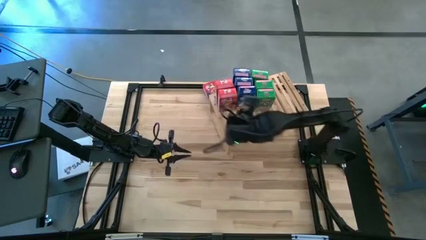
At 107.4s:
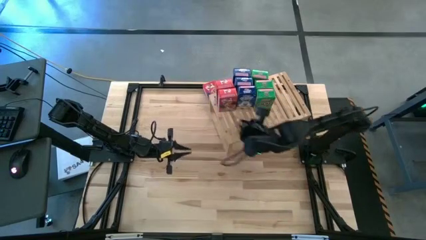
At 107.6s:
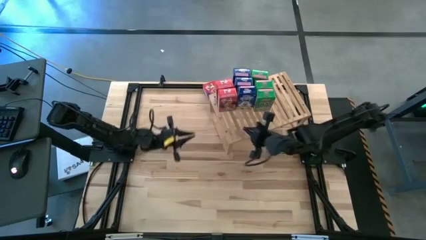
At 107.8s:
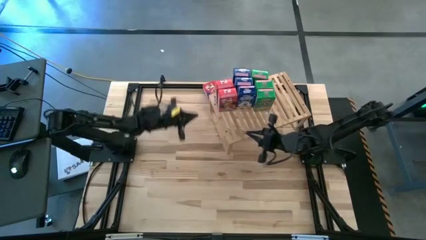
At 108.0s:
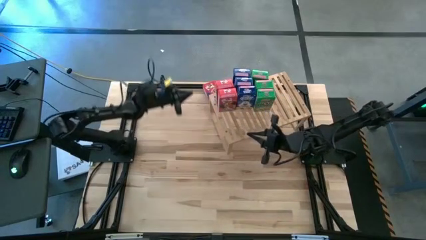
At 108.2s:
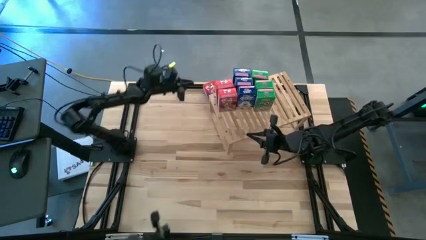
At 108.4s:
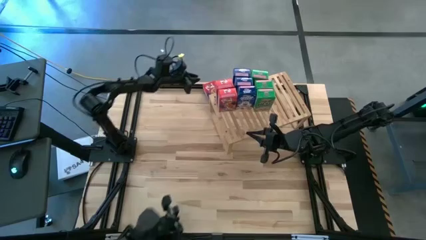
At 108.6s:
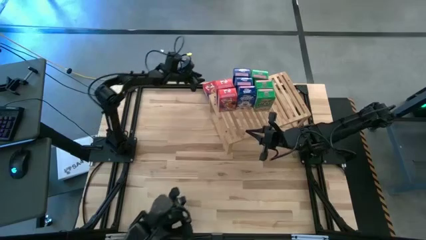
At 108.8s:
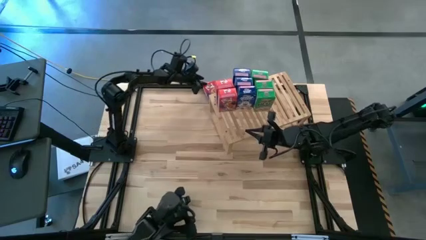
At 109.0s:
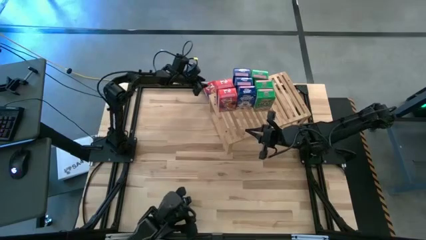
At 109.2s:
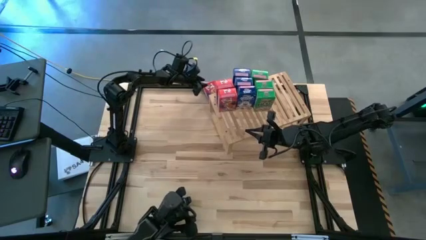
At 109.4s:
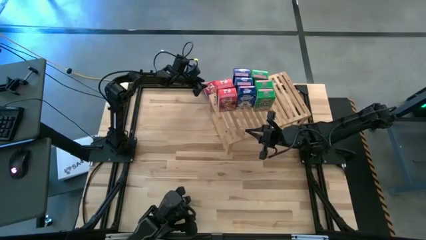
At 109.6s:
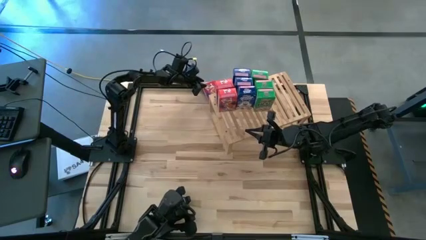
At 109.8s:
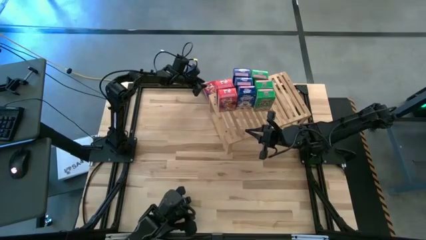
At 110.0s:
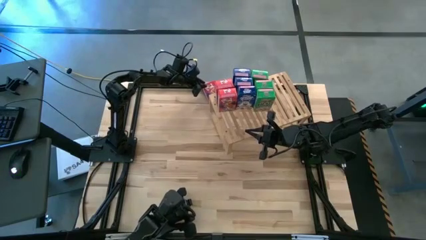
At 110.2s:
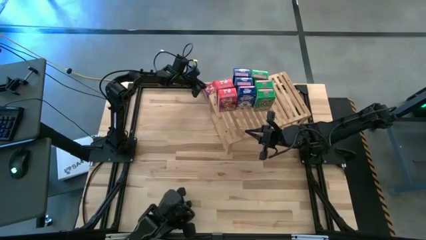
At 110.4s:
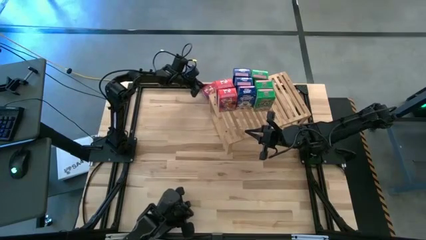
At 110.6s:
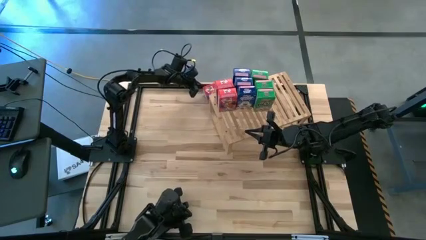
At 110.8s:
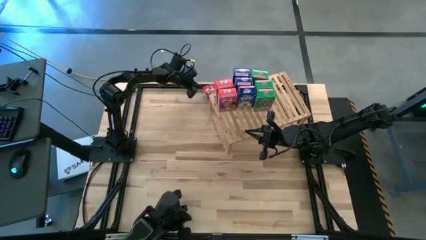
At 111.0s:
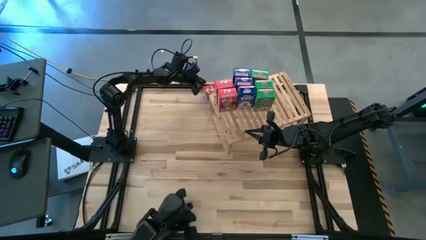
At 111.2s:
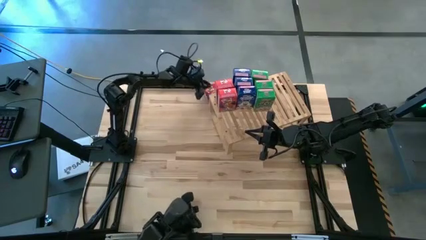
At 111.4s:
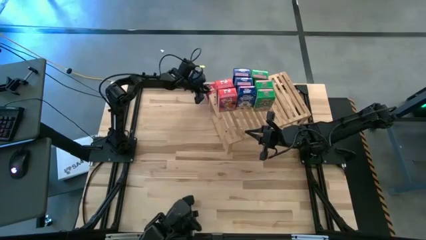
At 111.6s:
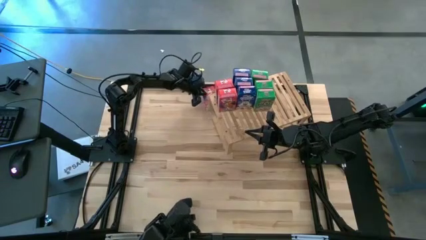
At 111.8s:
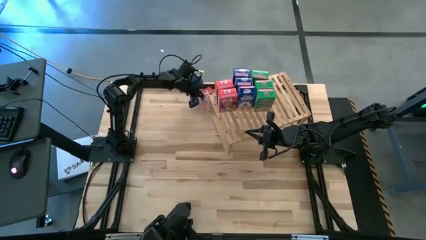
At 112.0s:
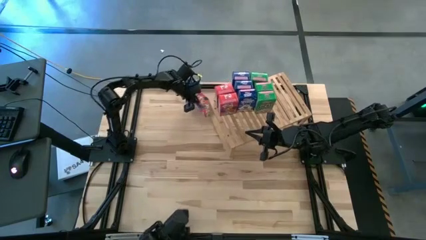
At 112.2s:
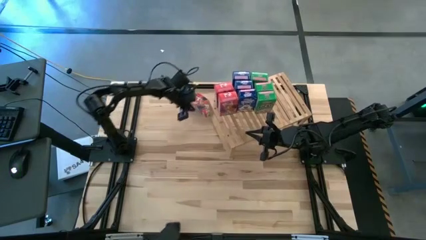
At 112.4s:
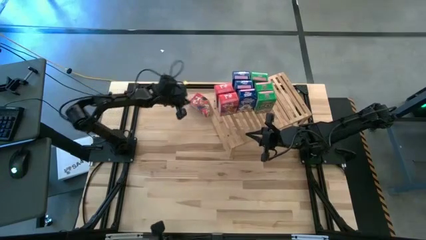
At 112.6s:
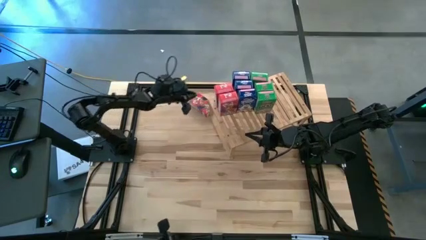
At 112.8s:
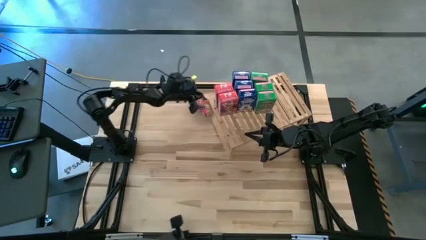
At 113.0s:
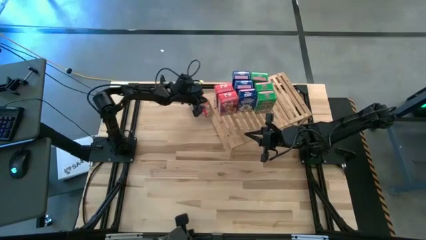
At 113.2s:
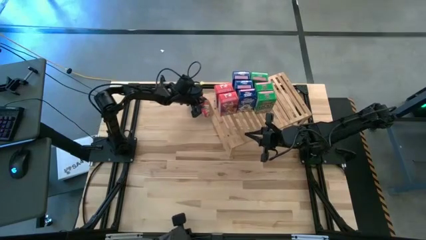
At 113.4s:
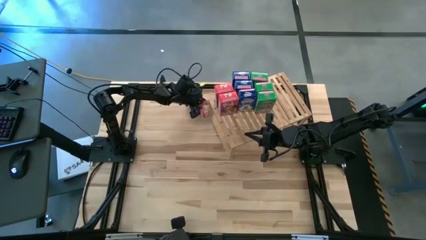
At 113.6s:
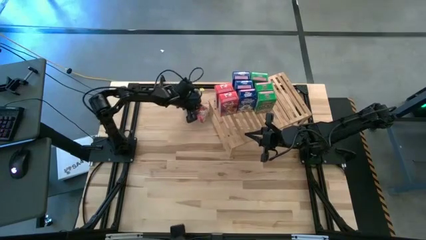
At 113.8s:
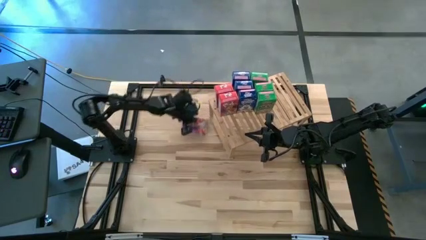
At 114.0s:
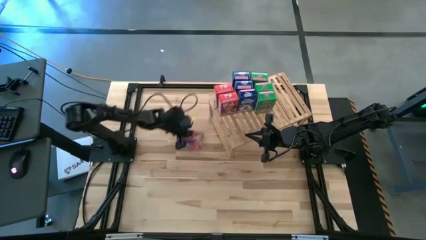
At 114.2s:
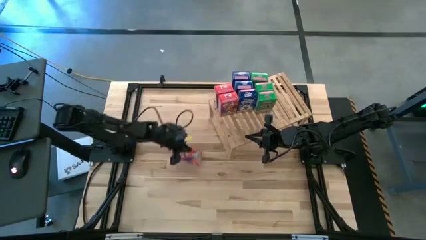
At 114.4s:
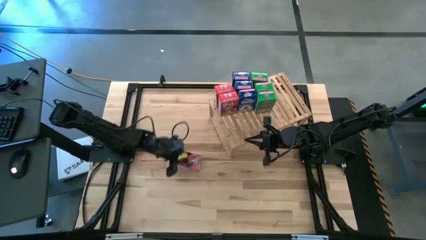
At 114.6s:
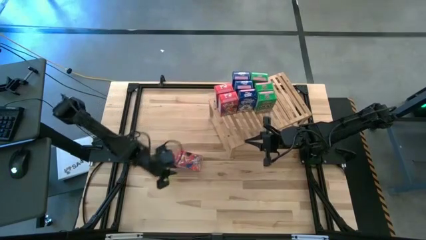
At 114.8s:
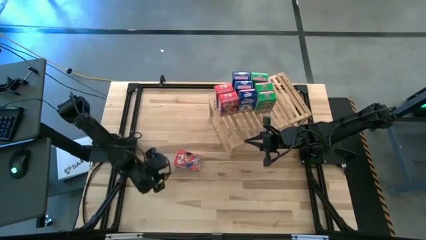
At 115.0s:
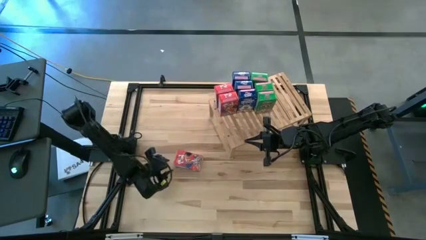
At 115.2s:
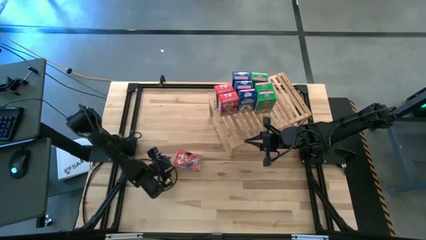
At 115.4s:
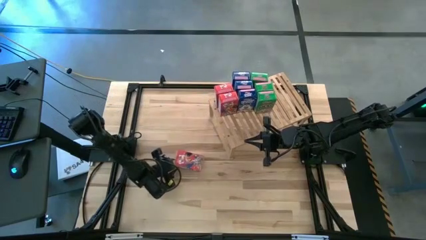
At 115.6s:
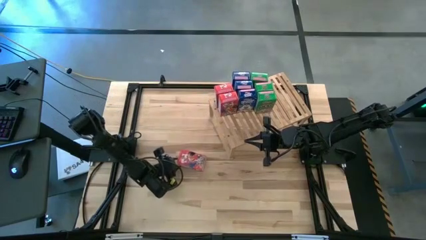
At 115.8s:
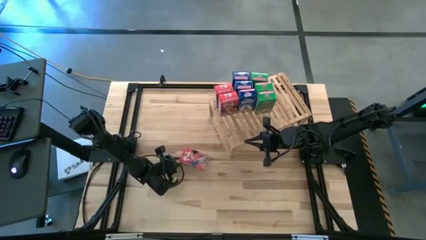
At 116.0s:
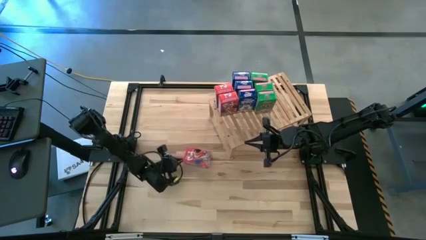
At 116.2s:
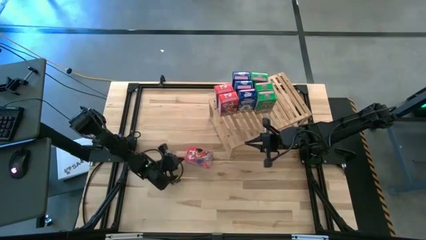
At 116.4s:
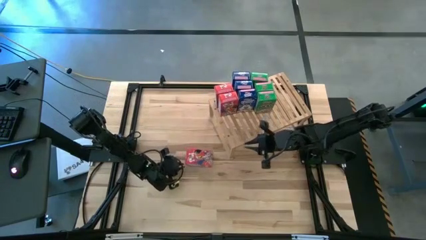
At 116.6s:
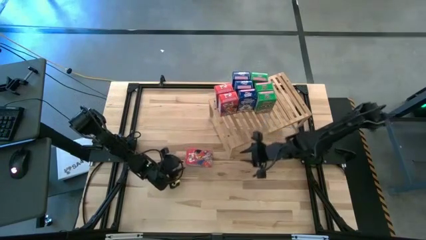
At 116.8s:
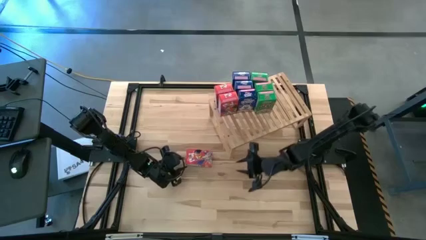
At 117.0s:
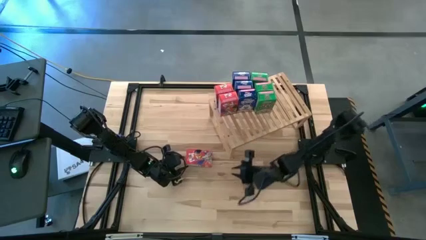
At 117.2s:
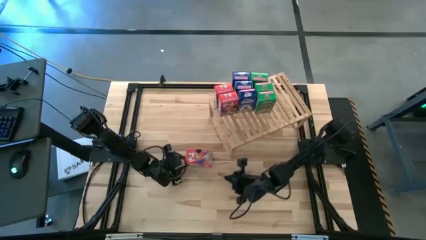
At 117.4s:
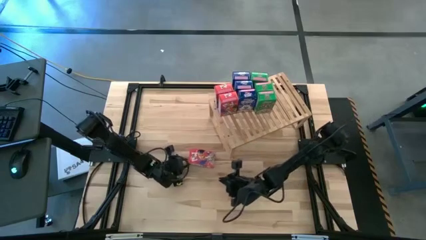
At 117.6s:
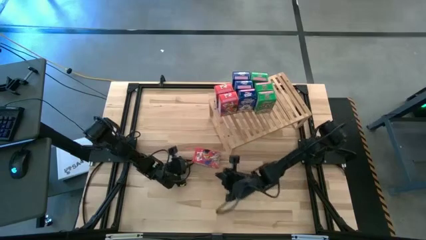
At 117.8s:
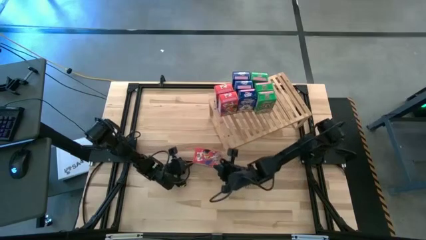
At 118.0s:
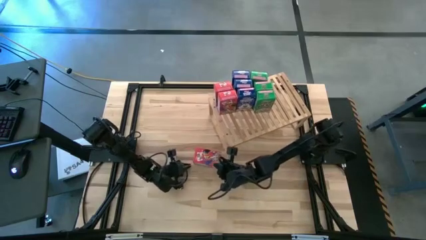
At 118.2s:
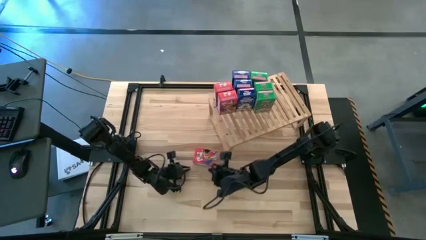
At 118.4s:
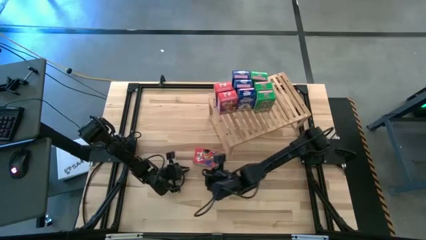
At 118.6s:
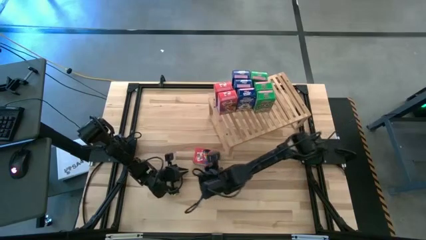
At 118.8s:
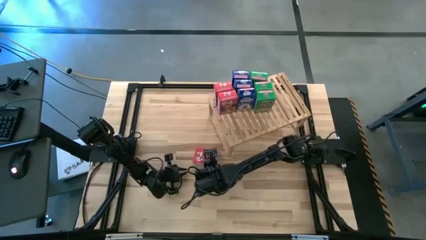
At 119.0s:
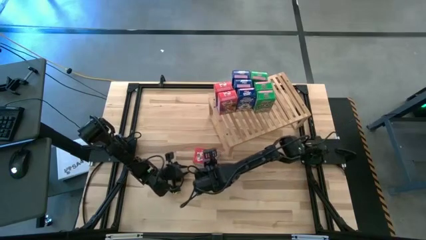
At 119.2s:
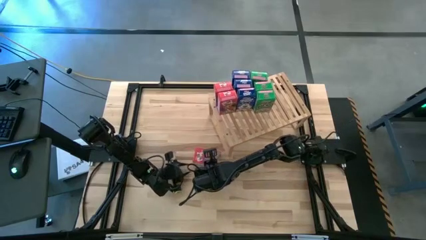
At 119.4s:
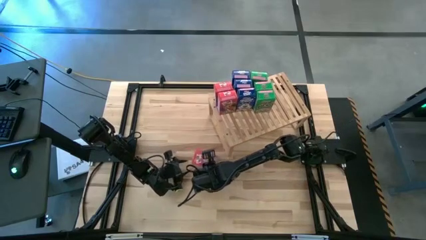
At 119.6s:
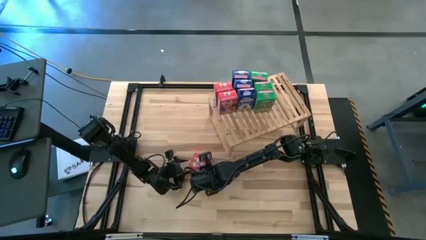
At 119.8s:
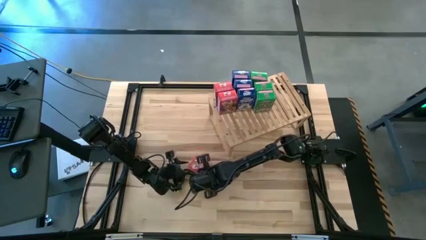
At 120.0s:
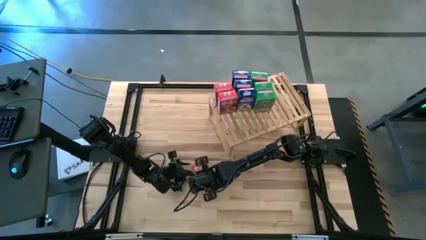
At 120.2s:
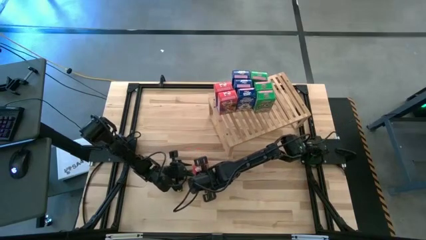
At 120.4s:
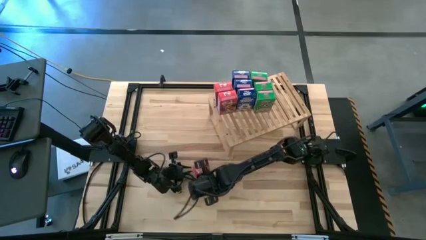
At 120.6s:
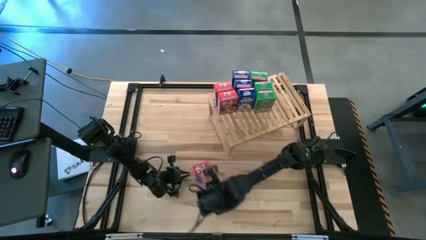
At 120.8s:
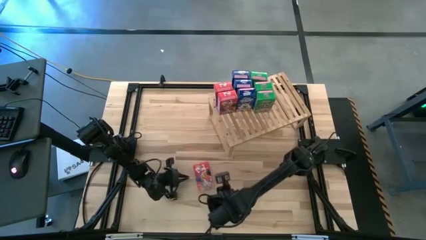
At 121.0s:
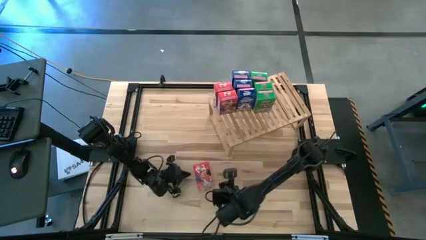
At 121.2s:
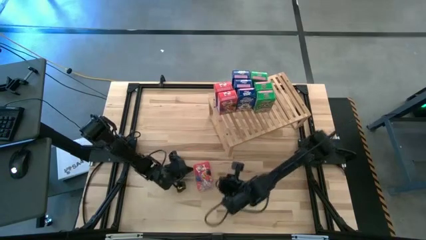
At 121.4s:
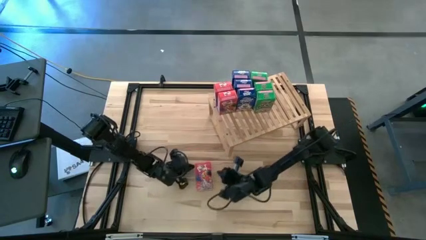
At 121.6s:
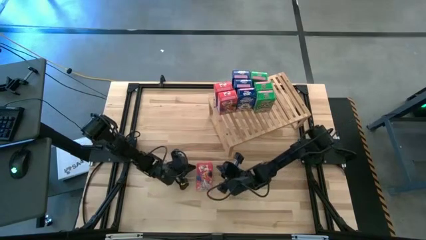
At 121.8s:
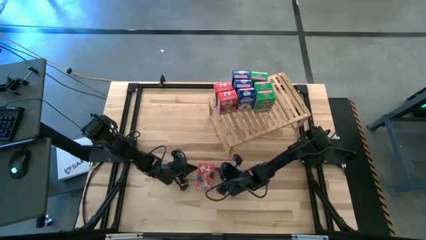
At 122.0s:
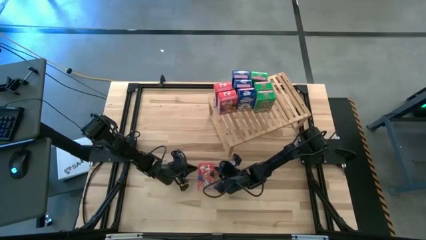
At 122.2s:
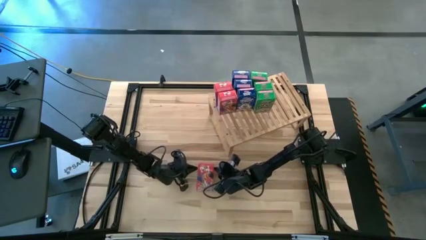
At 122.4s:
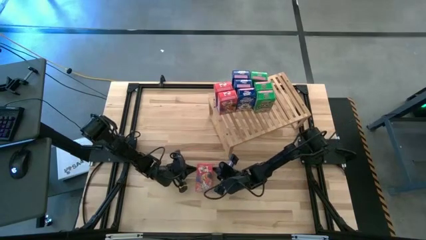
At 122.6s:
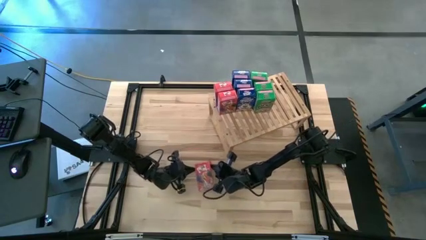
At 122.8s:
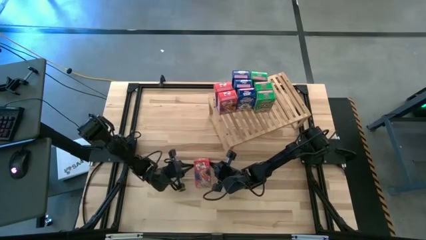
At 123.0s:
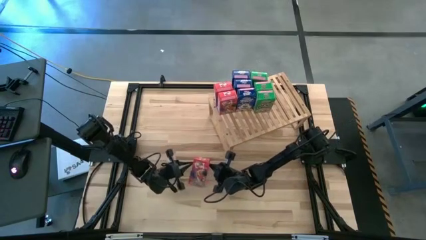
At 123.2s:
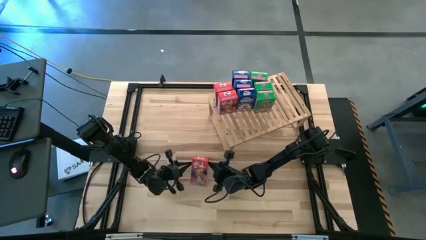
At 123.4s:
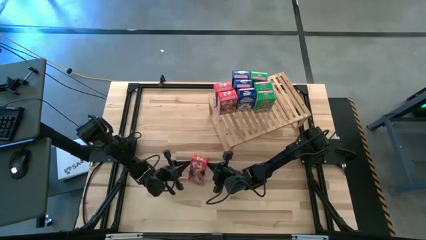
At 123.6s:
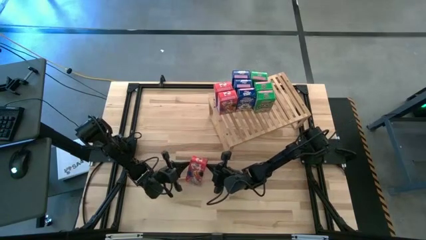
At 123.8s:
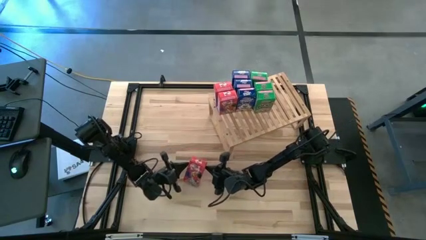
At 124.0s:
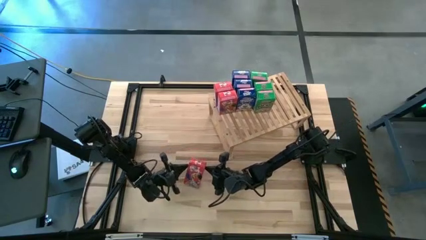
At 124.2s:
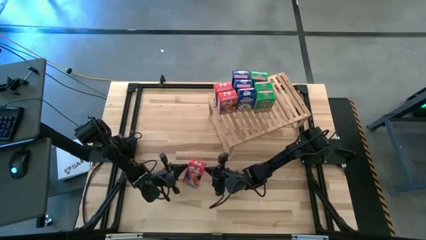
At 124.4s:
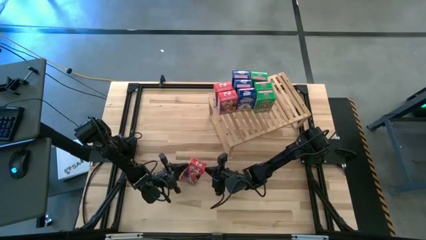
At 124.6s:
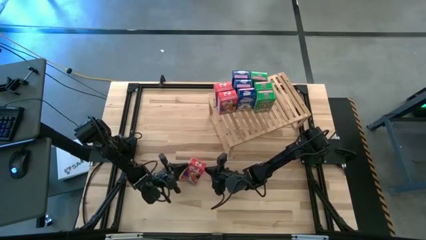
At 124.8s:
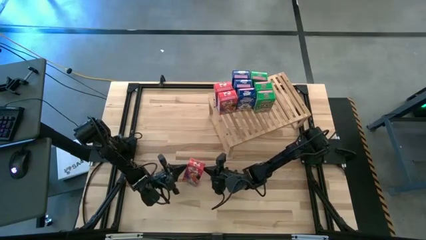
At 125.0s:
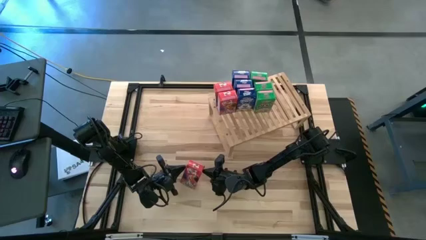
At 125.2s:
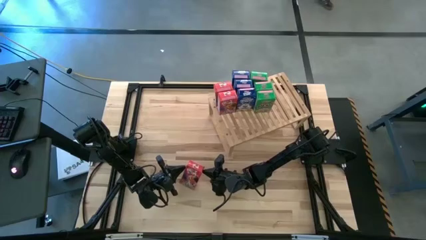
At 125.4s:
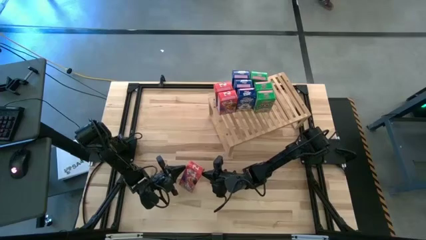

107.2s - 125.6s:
Task: Stack cereal on shelf
Put the red cereal box on the shelf aligned with the other red cereal boxes
